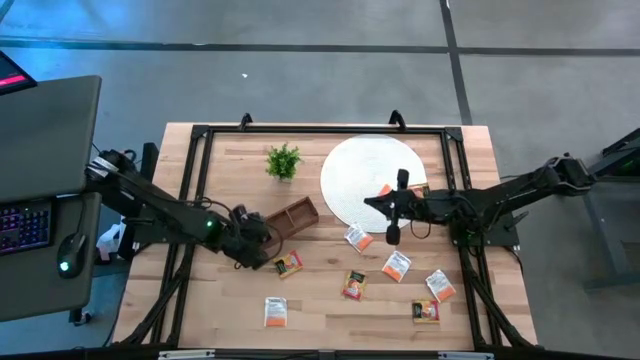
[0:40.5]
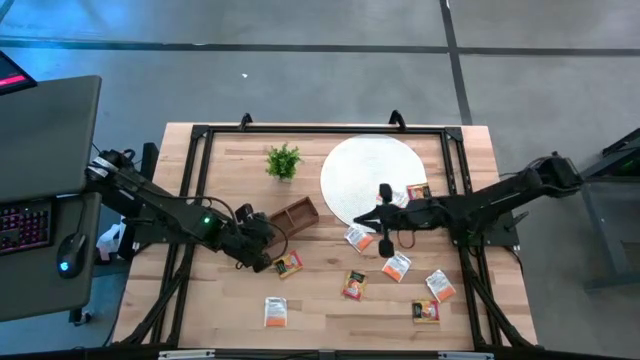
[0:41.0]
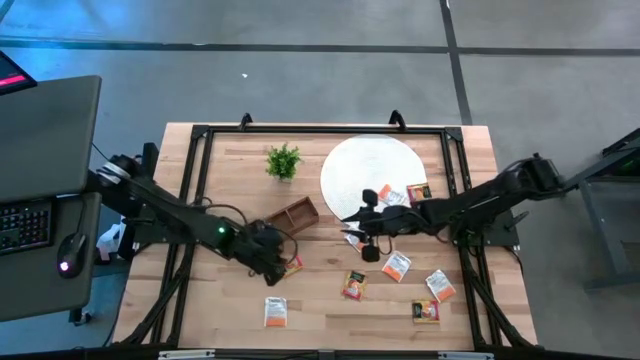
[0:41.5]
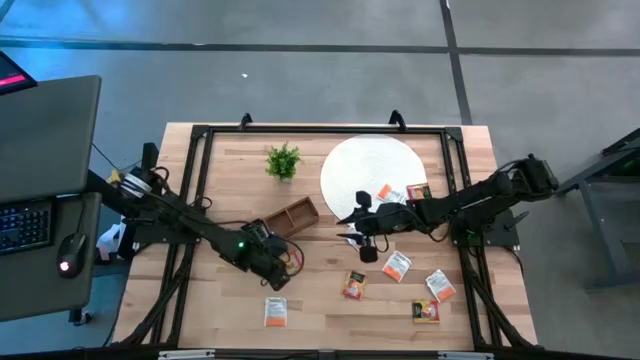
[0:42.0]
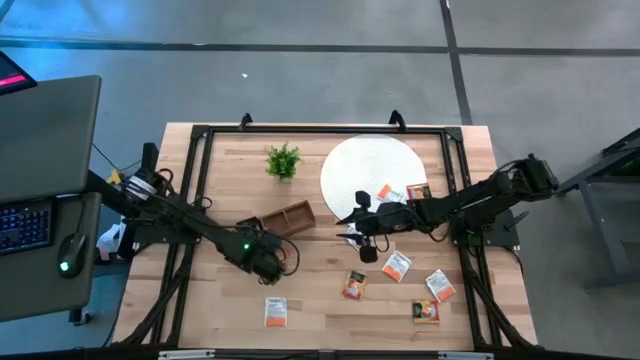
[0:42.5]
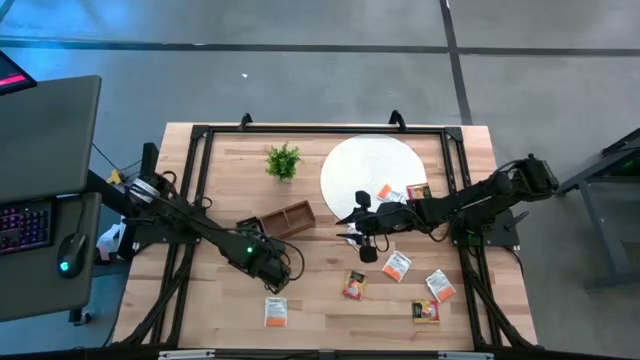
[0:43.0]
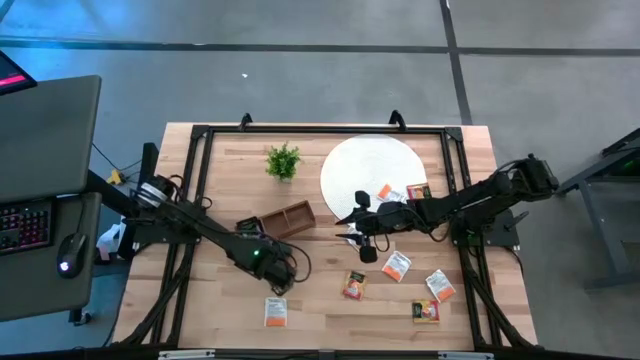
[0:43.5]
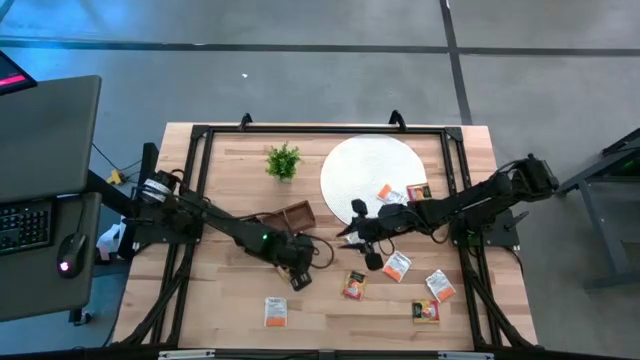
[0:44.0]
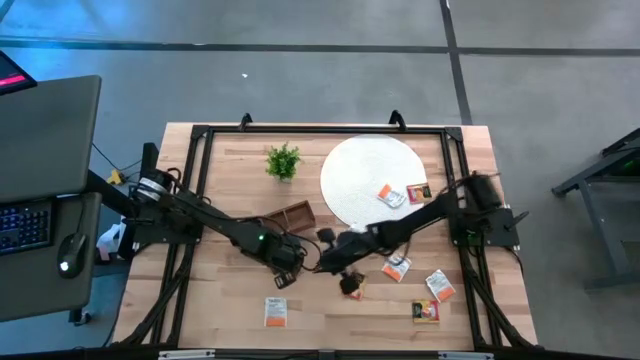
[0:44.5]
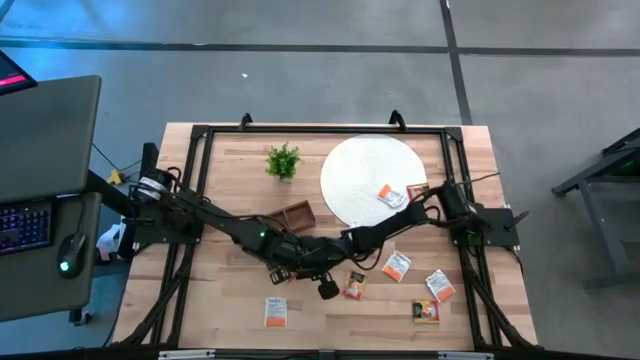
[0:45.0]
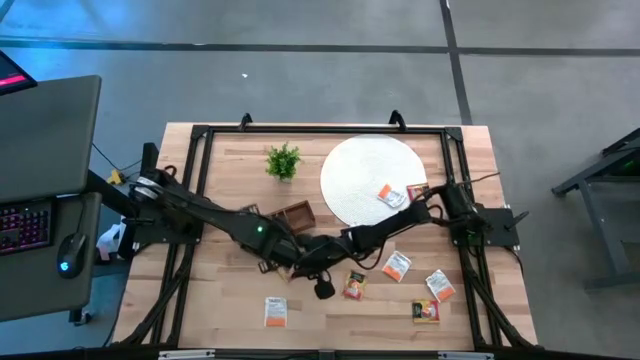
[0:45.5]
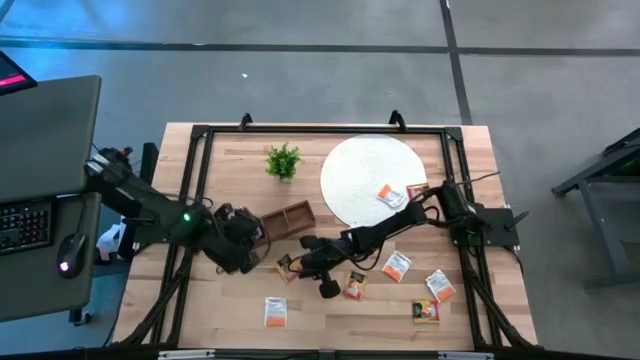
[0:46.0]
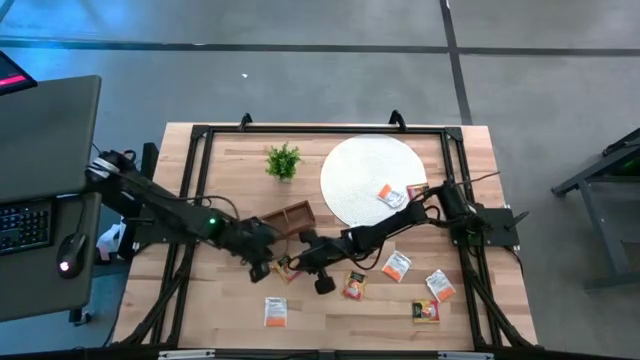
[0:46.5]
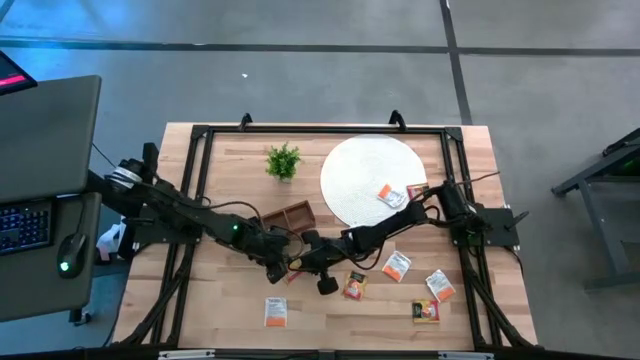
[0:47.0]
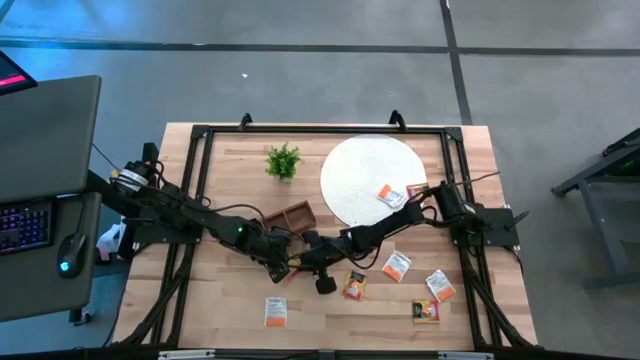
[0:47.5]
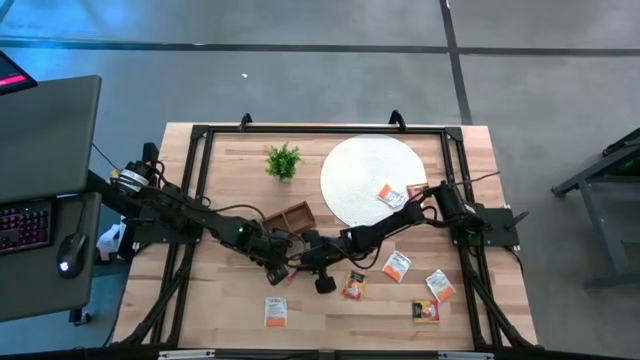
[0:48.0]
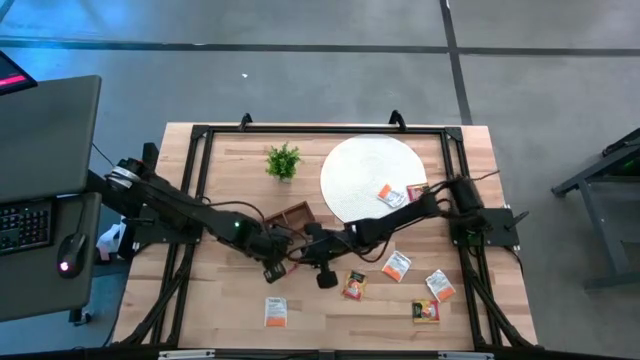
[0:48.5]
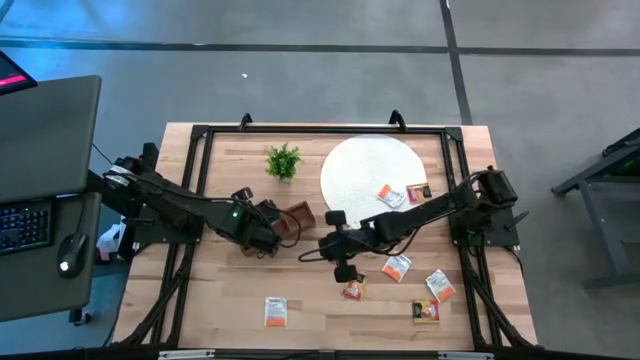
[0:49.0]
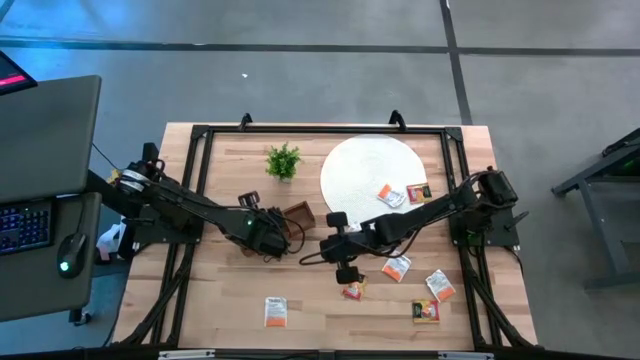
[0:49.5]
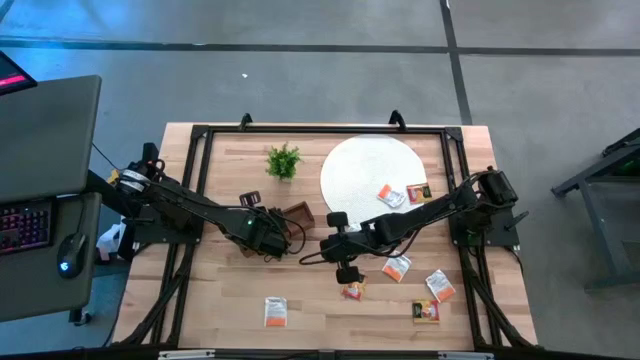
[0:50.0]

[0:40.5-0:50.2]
Task: Pick & Place Tea
Put the yellow tea bag into the middle section of the wooden organizer

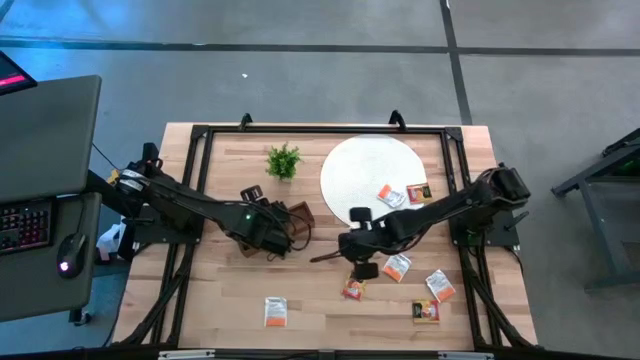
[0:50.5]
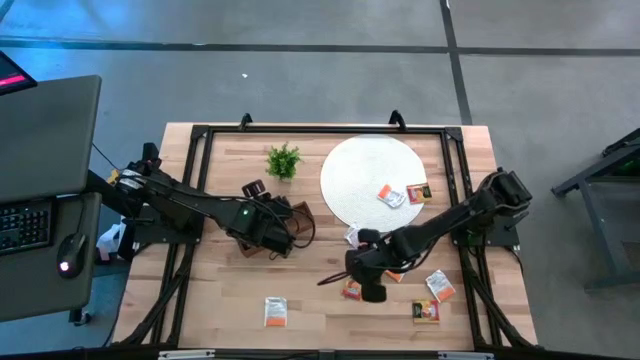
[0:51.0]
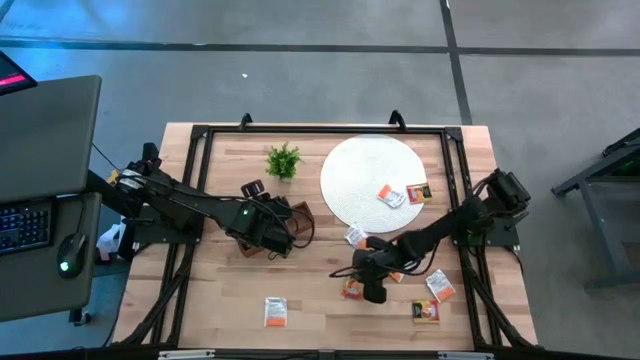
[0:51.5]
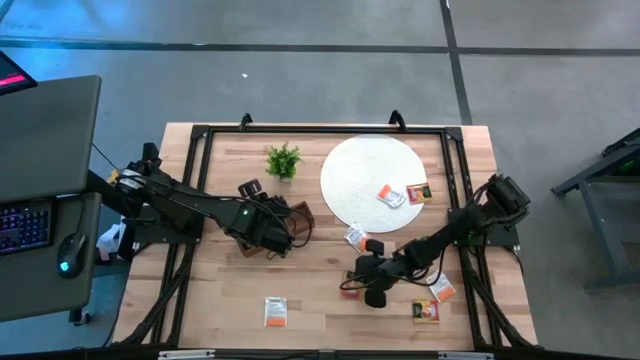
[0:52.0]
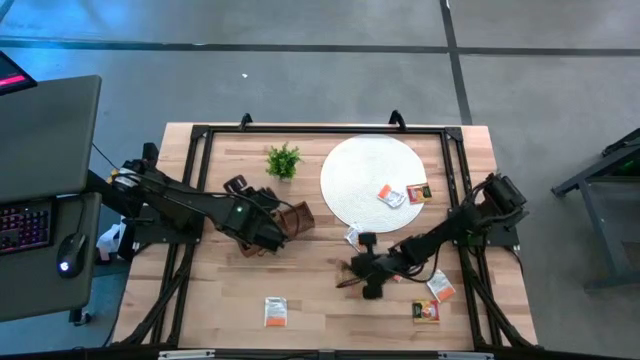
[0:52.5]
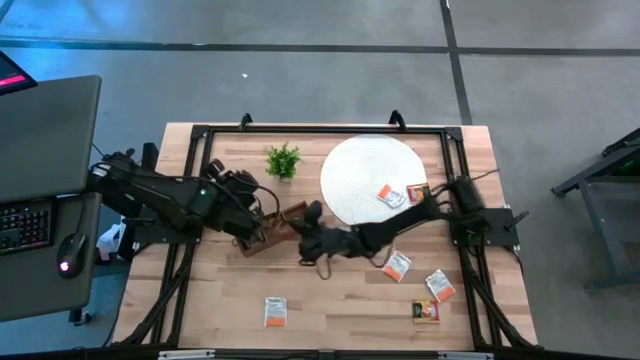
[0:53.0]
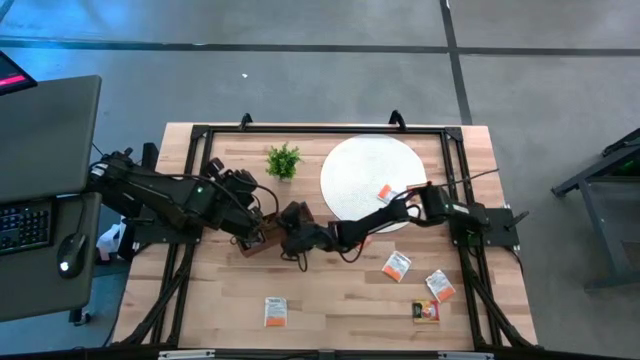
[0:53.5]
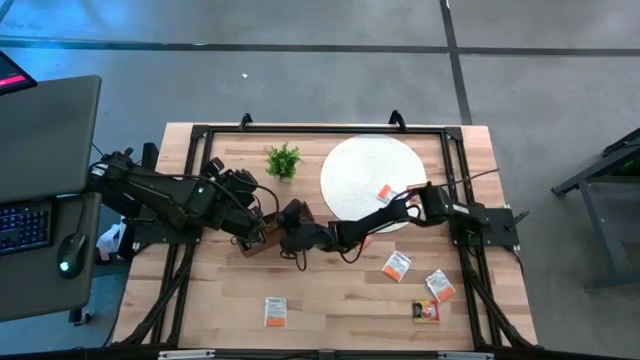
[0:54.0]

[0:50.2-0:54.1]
Put the yellow tea bag into the middle section of the wooden organizer

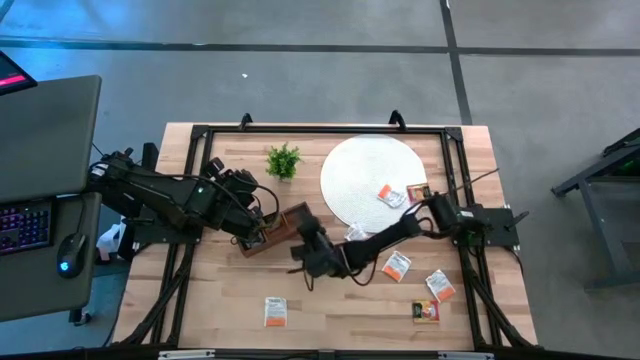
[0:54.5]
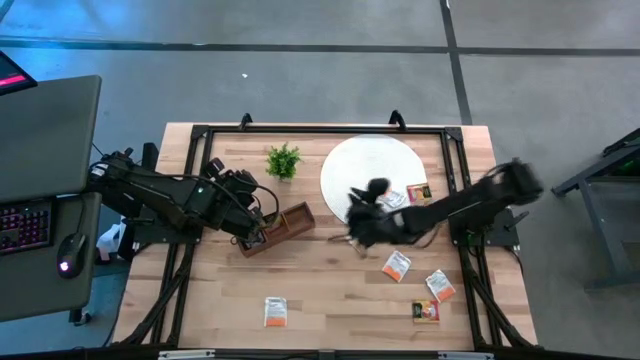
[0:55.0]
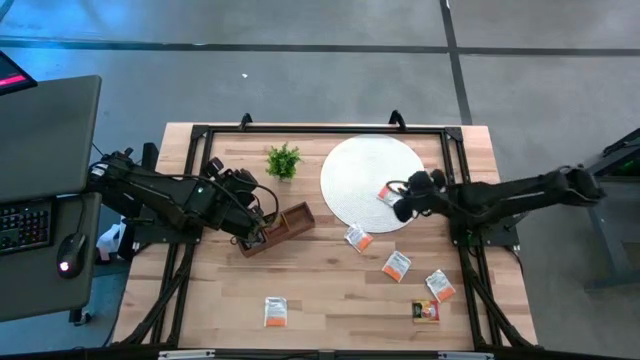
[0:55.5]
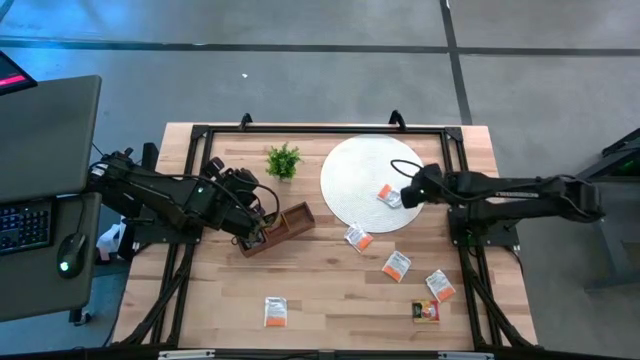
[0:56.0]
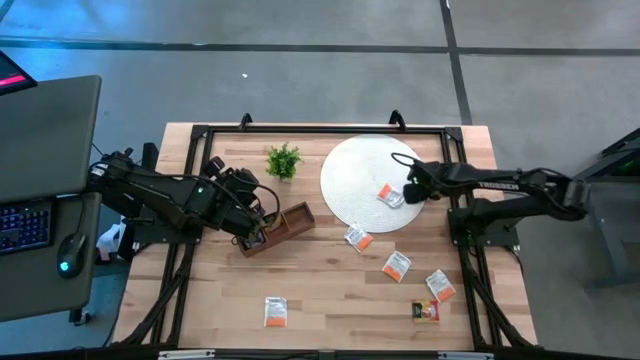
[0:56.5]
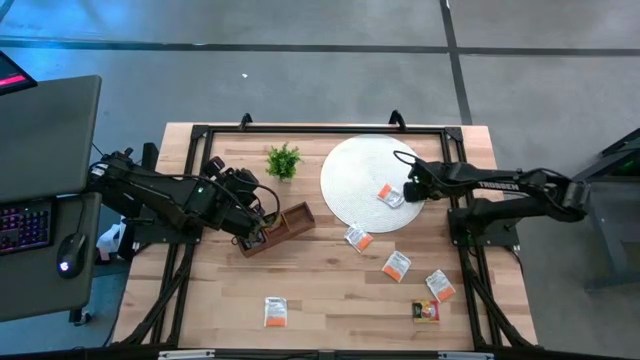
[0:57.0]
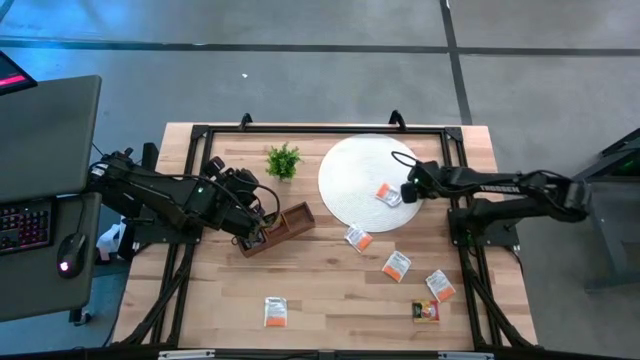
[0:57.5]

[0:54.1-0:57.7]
Put the yellow tea bag into the middle section of the wooden organizer

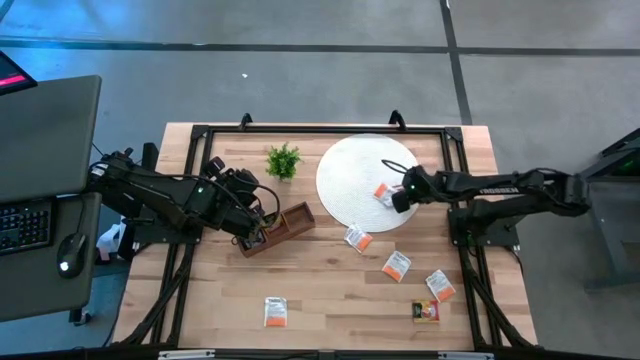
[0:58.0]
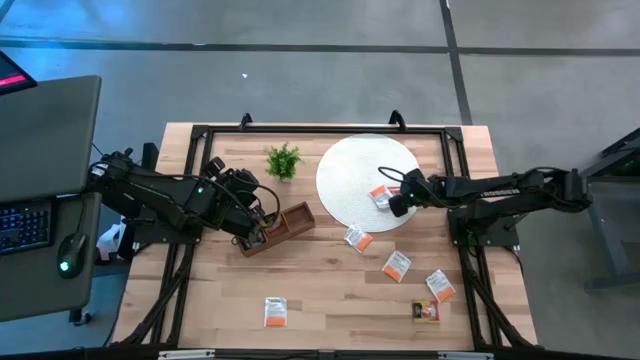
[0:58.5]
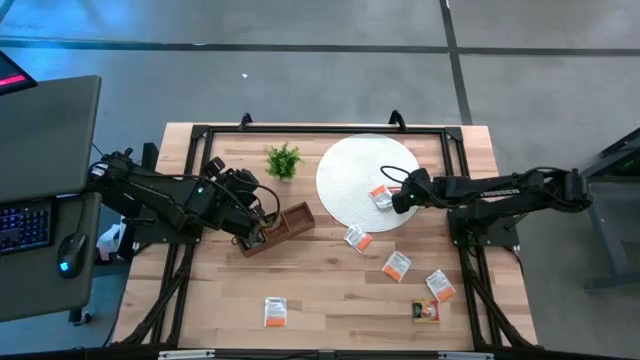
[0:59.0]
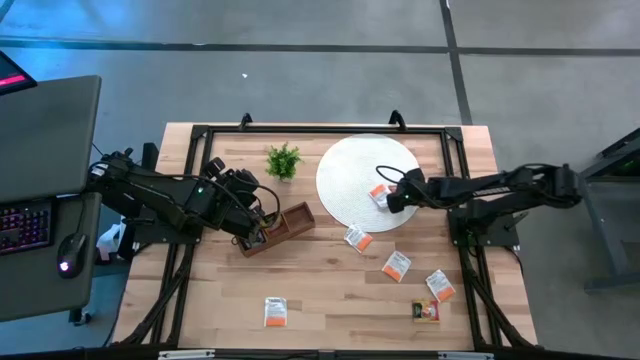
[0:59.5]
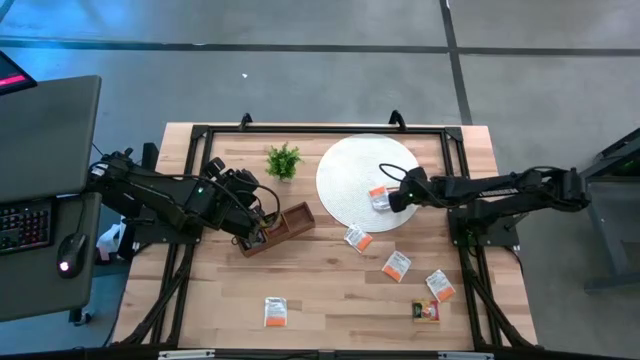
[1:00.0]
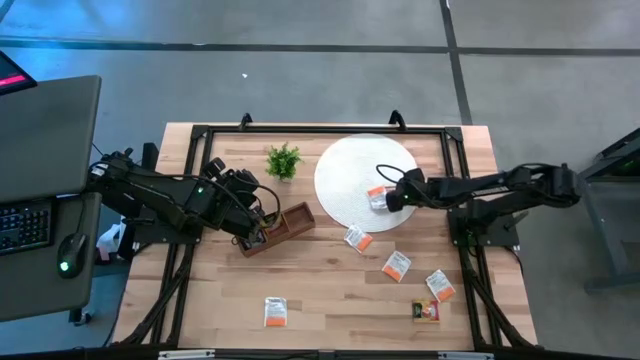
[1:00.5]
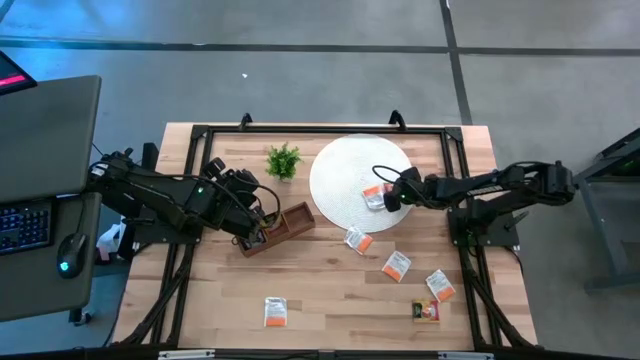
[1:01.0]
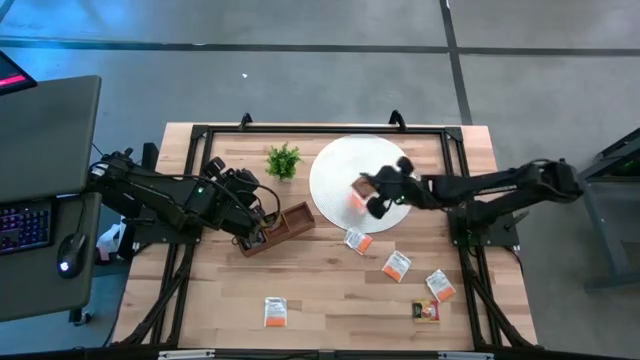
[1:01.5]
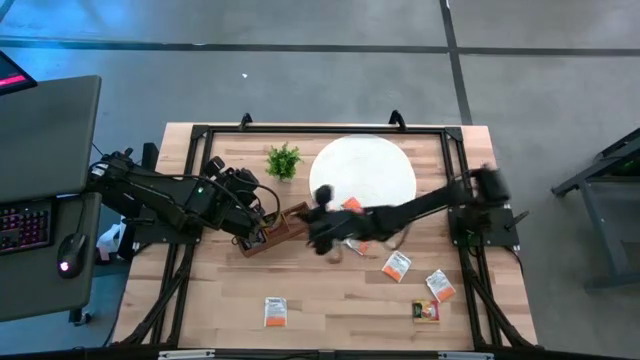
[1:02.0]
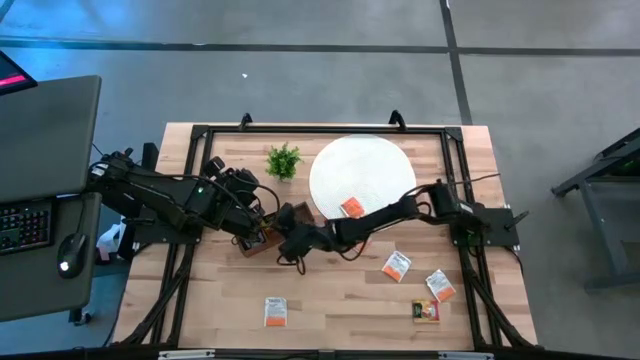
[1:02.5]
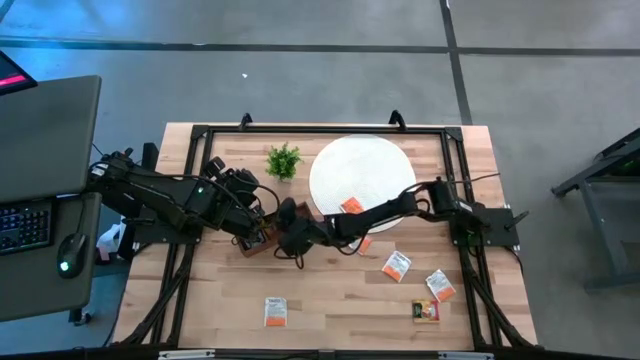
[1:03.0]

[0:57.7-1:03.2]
Put the yellow tea bag into the middle section of the wooden organizer
